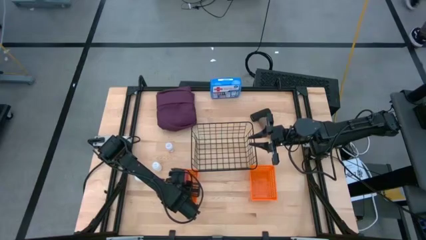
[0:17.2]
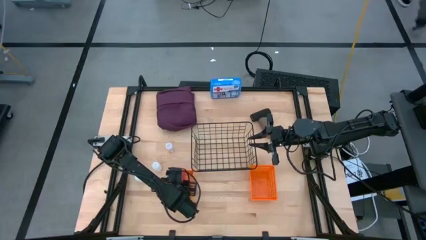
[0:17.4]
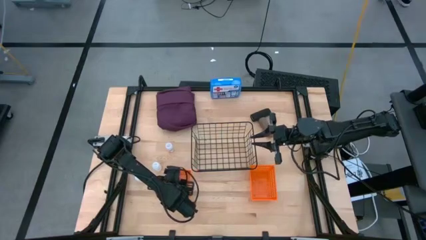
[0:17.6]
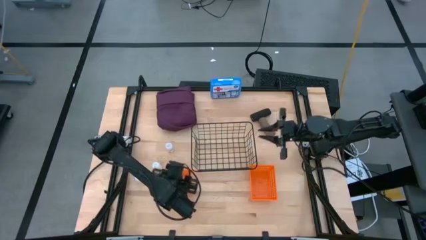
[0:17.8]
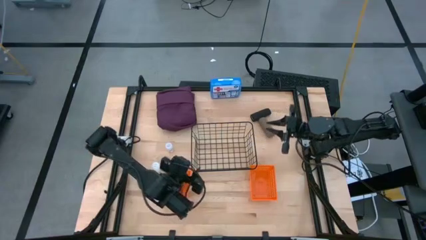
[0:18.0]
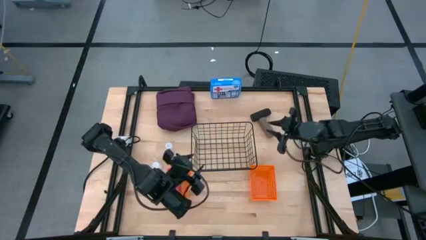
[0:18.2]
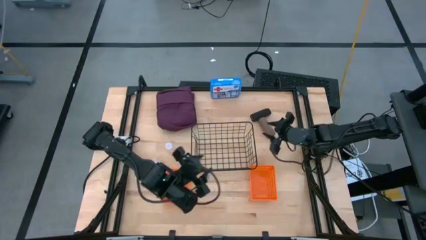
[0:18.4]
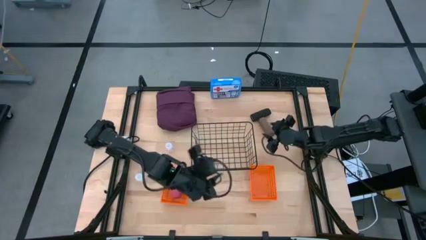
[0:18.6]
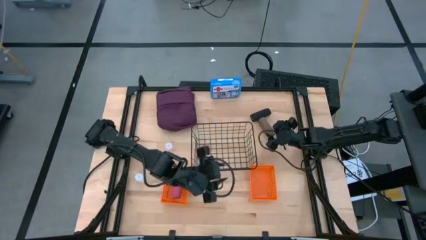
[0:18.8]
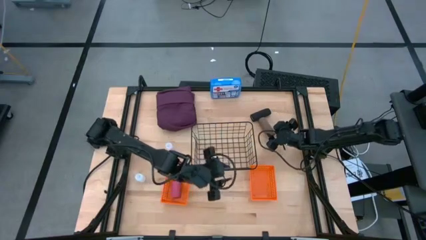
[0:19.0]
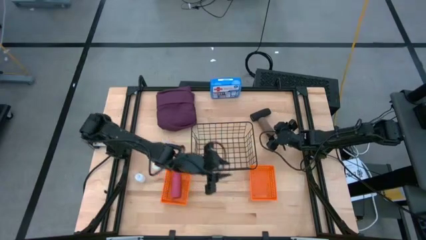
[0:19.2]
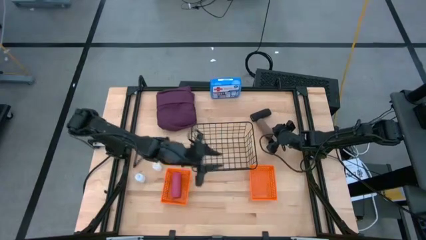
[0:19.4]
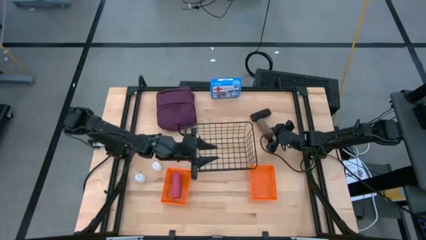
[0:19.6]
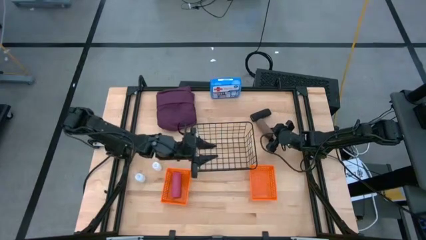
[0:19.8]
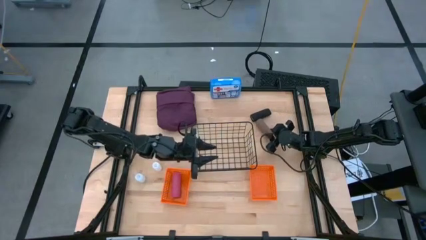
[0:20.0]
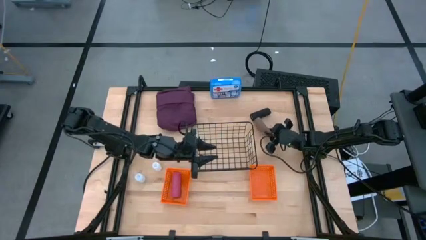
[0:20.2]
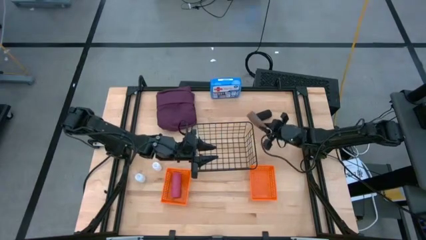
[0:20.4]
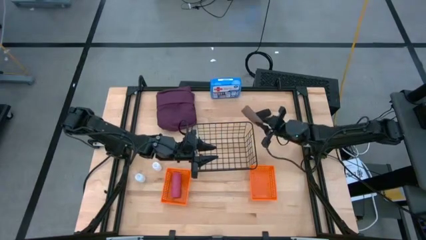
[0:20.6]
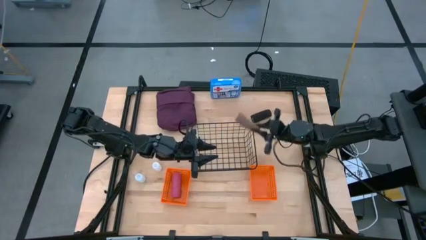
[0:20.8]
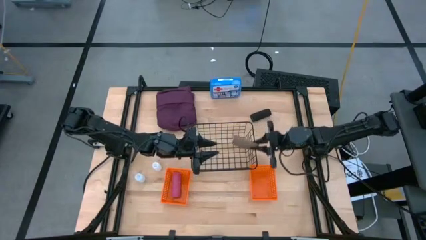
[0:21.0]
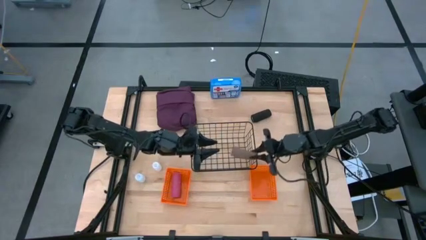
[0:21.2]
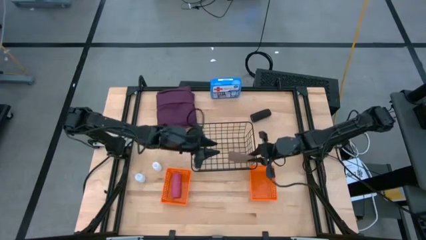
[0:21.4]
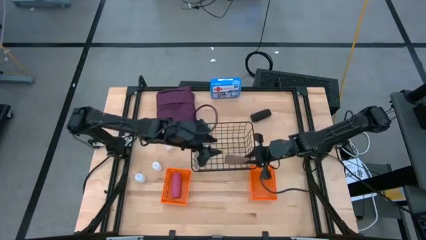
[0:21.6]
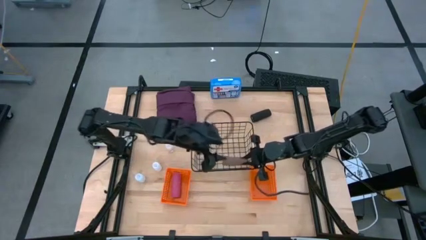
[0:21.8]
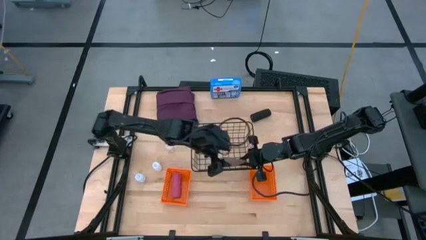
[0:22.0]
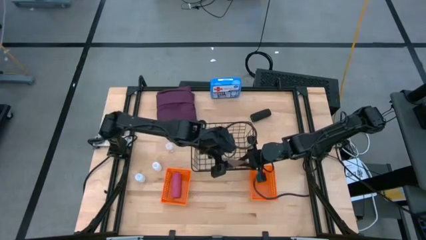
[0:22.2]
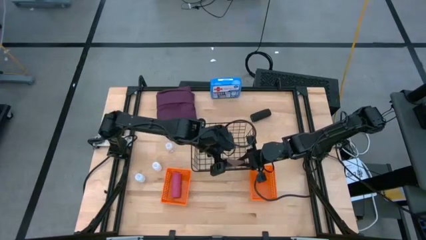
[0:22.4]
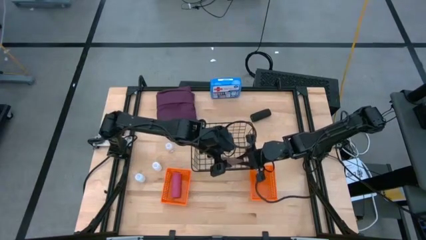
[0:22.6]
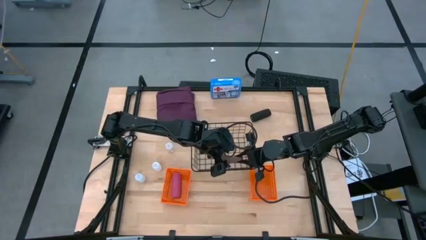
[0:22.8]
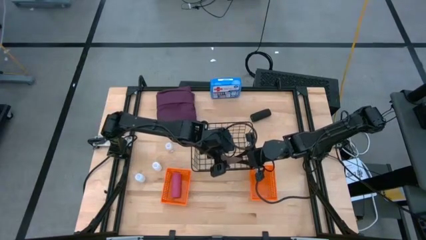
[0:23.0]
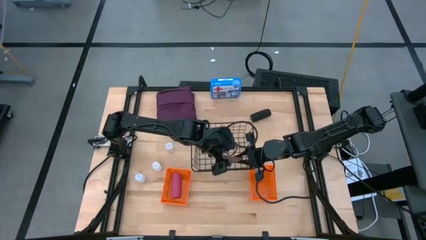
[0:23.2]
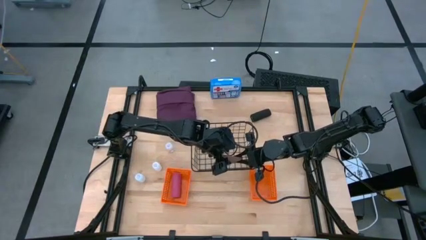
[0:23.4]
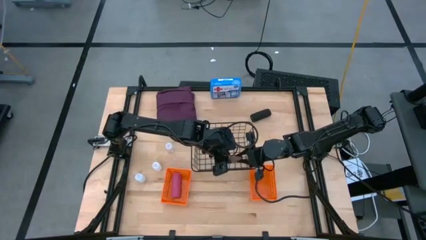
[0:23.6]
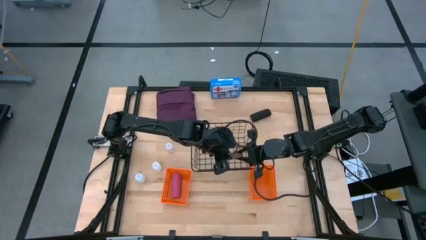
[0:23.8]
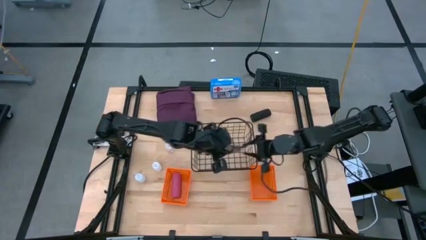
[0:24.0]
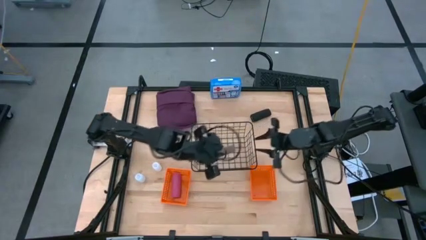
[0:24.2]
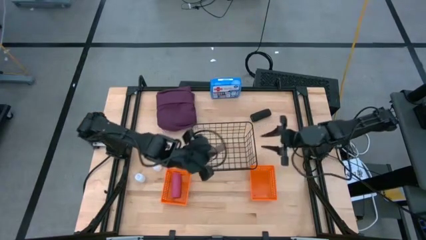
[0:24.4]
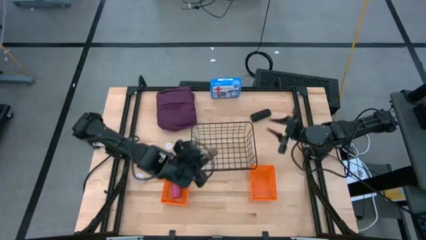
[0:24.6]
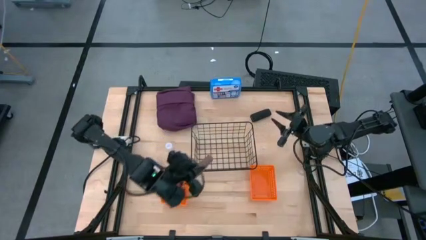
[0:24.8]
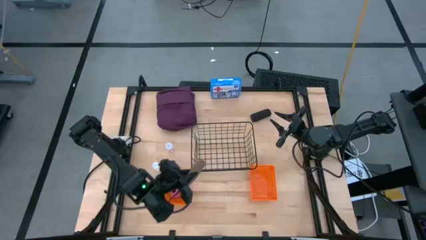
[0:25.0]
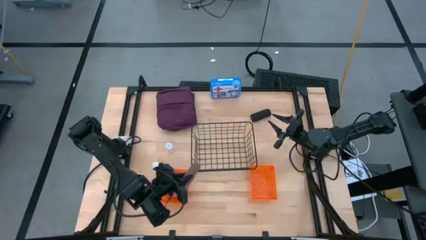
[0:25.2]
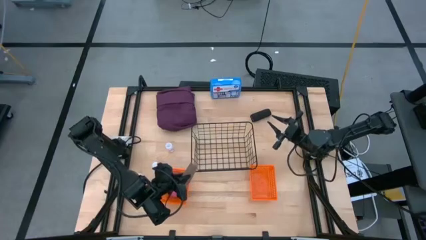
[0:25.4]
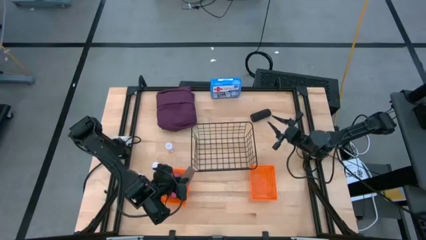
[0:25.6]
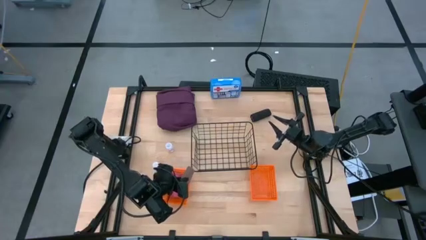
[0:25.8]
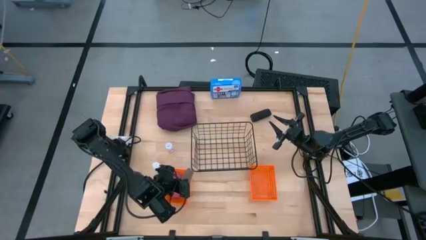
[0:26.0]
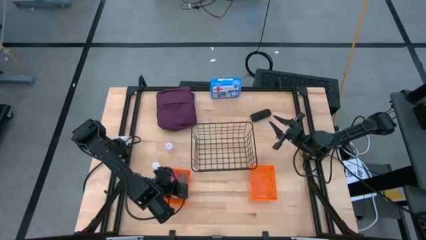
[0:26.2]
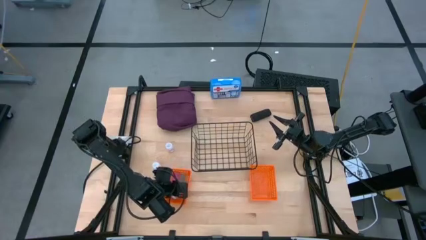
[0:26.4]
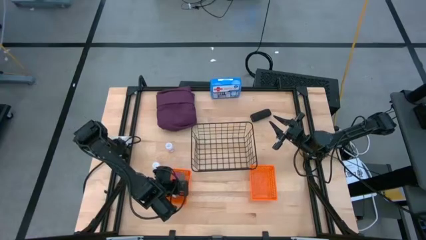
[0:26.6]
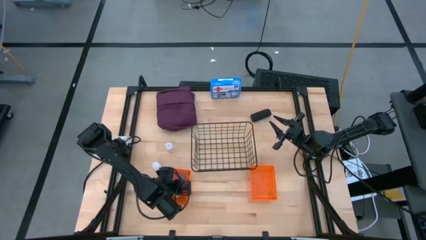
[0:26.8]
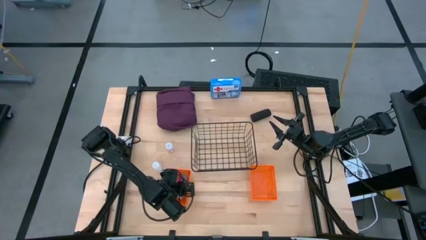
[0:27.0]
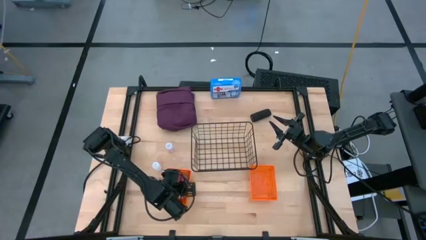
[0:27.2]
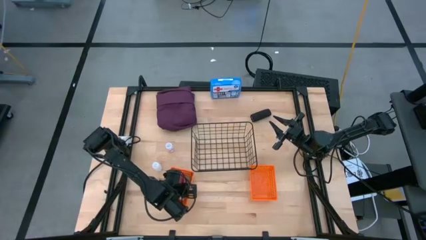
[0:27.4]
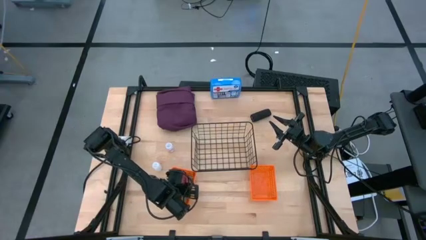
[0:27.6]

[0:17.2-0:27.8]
Task: Pick & Place Medicine items
Put the brown bandage into the left orange basket
